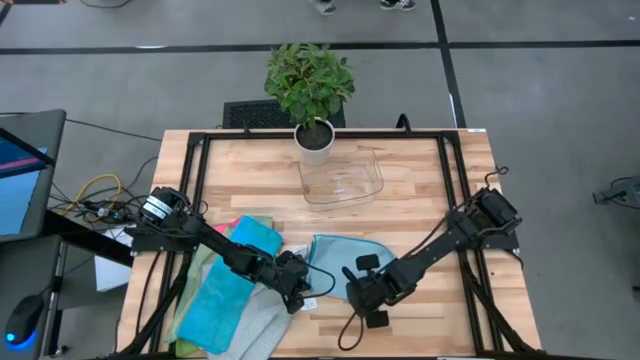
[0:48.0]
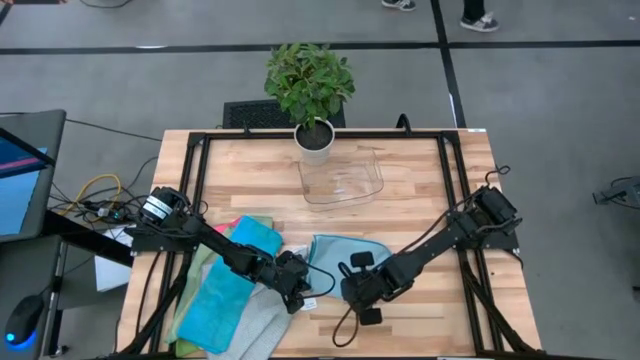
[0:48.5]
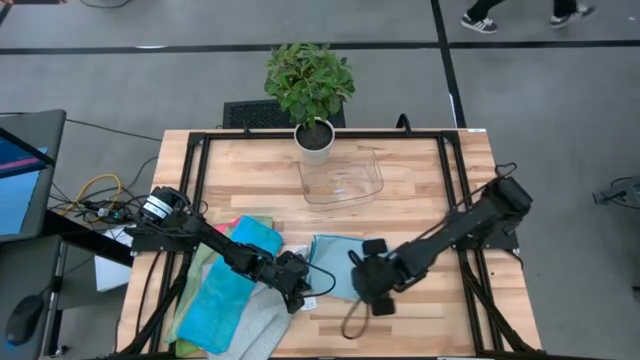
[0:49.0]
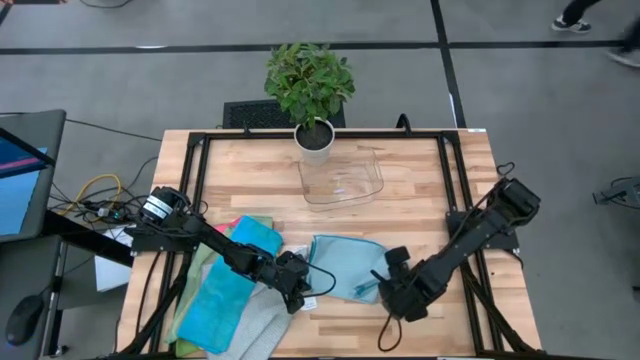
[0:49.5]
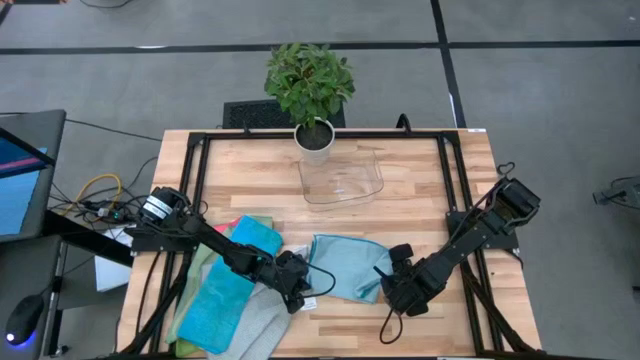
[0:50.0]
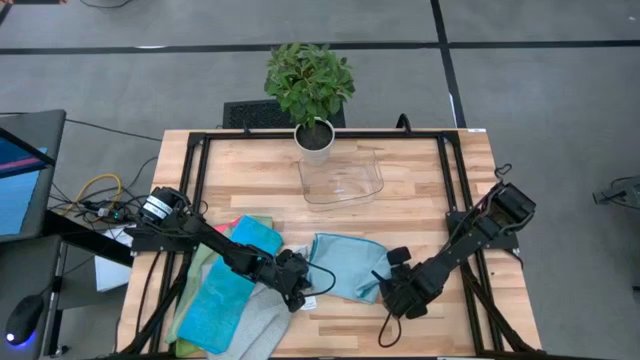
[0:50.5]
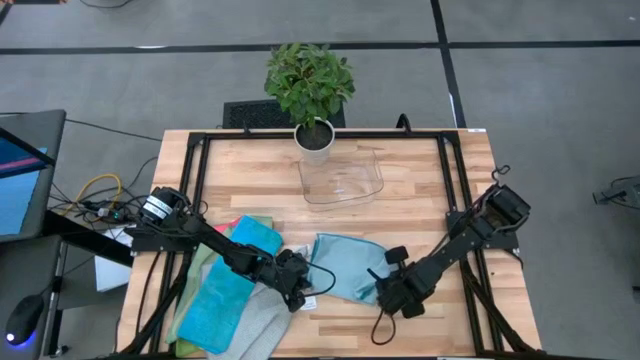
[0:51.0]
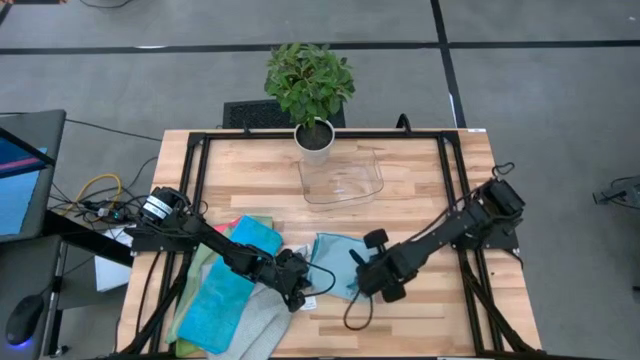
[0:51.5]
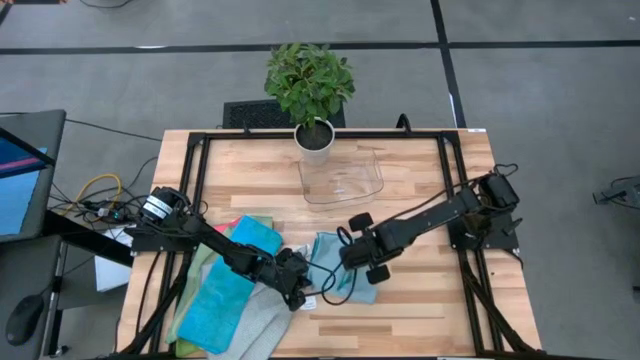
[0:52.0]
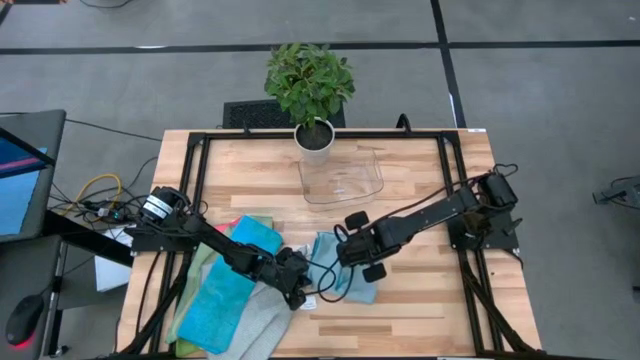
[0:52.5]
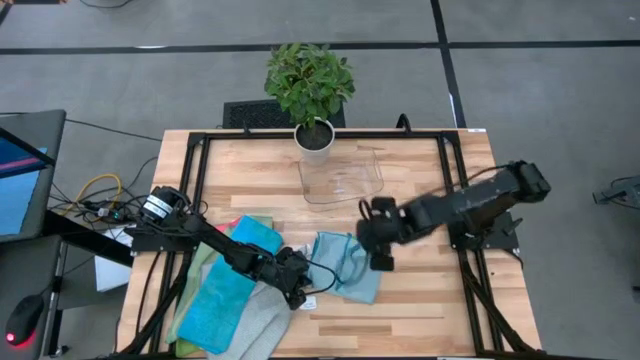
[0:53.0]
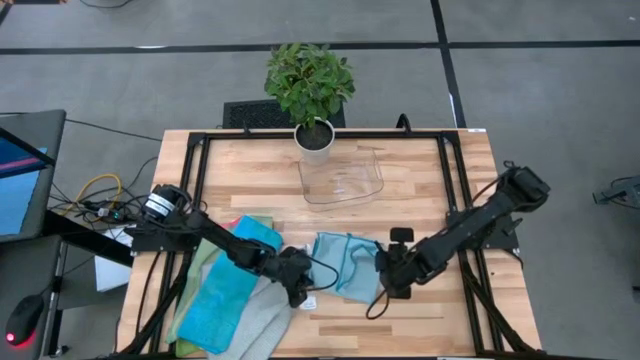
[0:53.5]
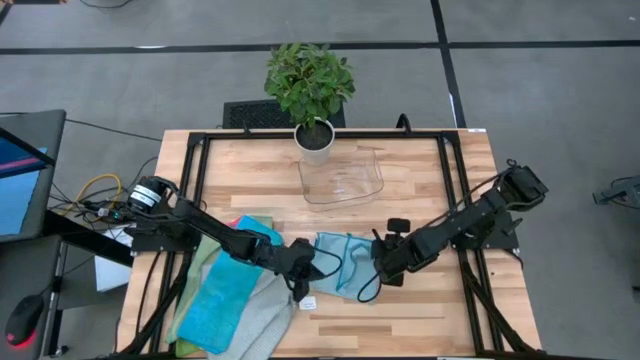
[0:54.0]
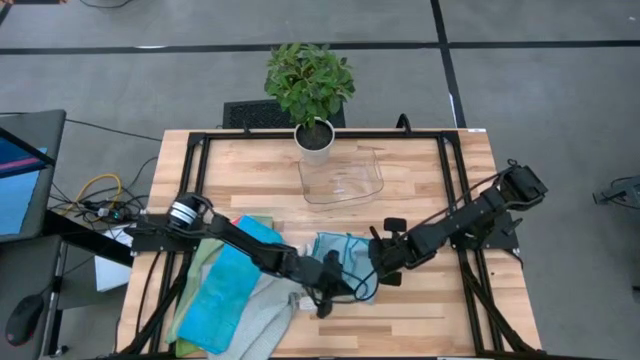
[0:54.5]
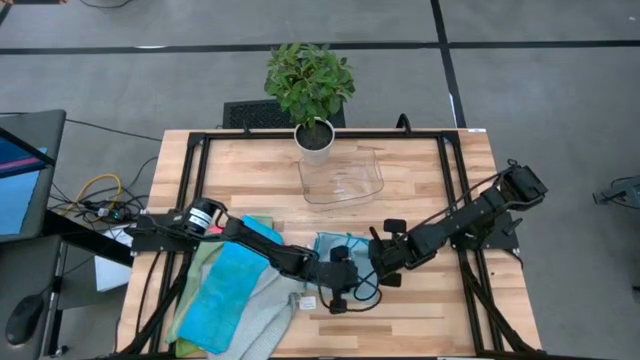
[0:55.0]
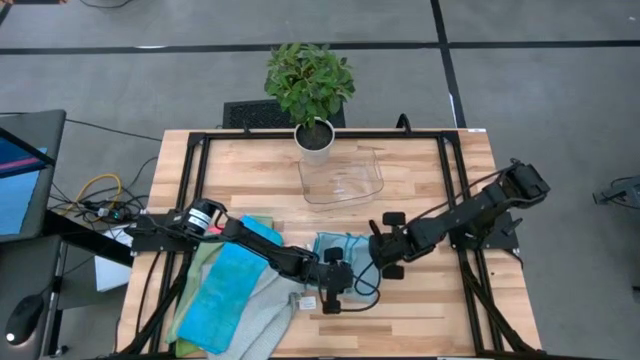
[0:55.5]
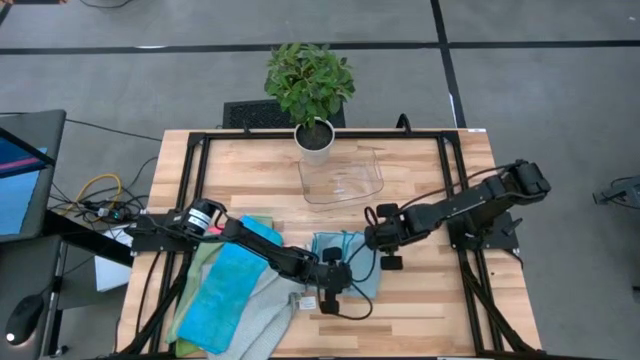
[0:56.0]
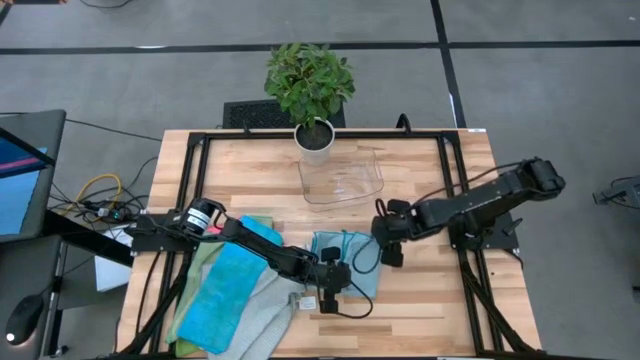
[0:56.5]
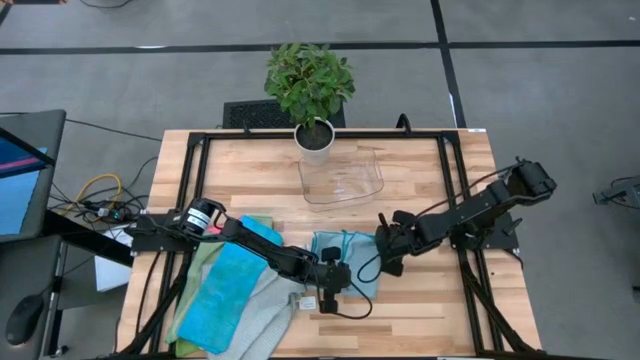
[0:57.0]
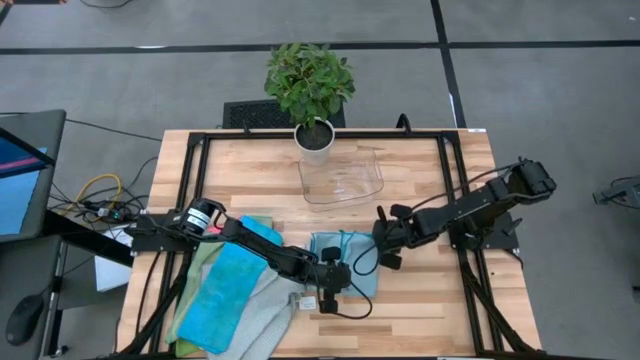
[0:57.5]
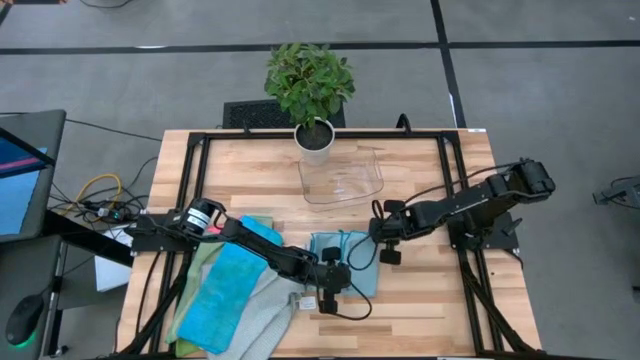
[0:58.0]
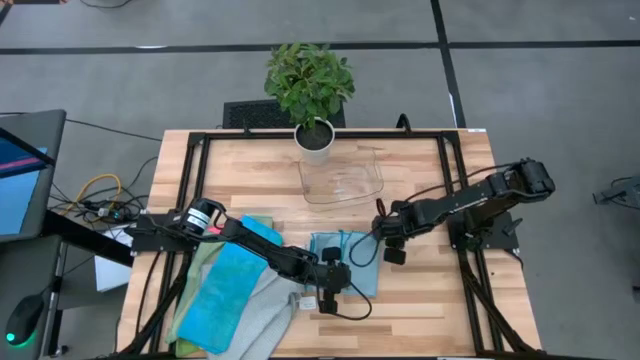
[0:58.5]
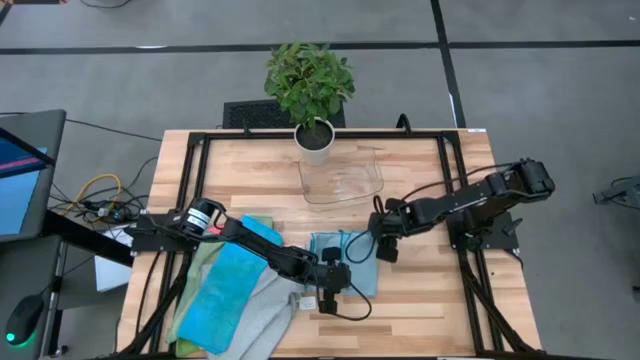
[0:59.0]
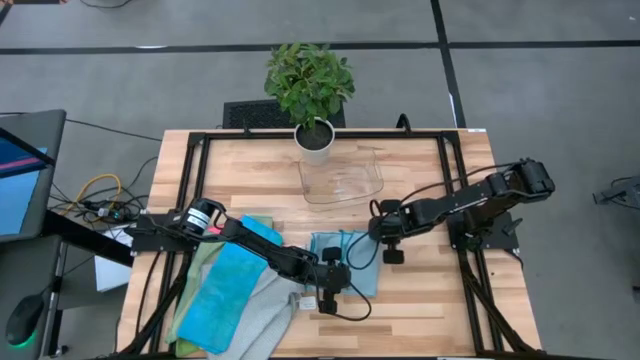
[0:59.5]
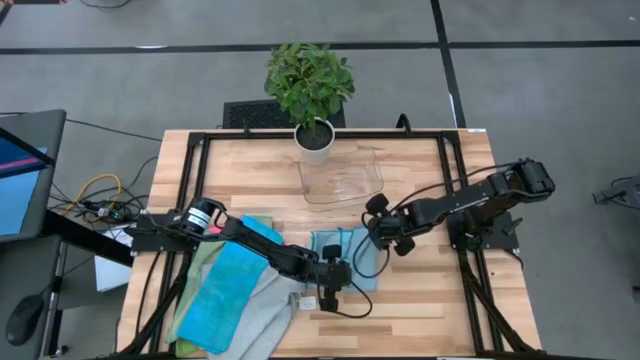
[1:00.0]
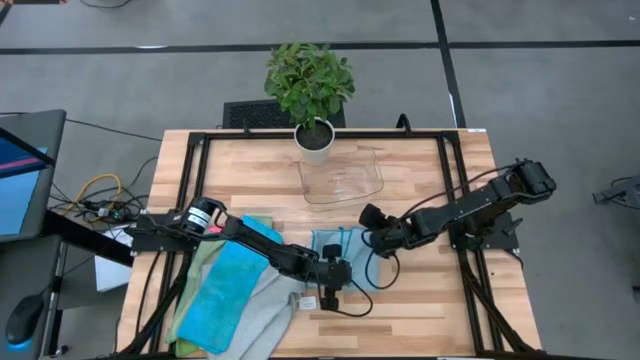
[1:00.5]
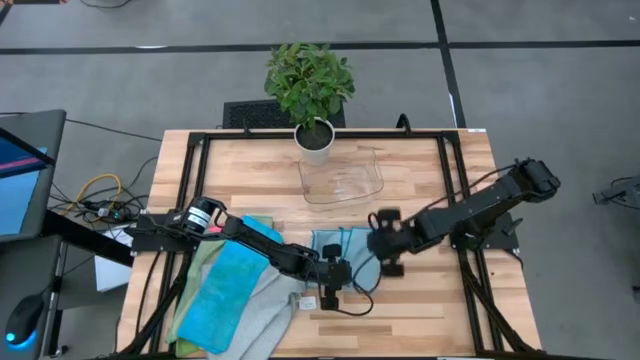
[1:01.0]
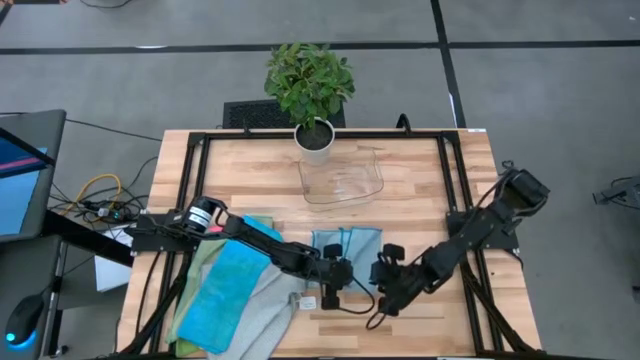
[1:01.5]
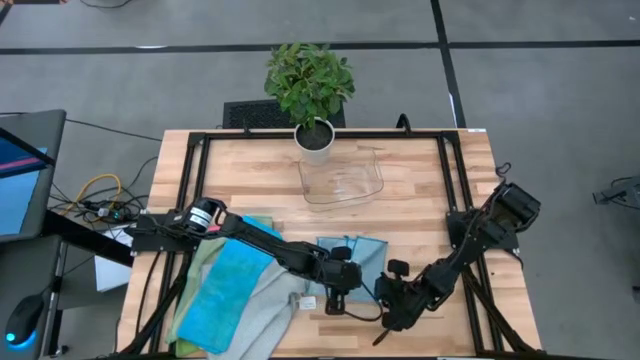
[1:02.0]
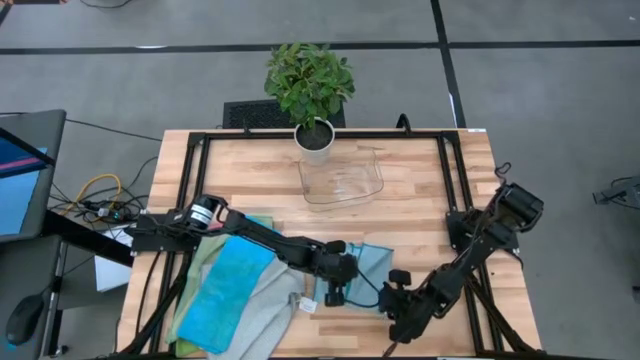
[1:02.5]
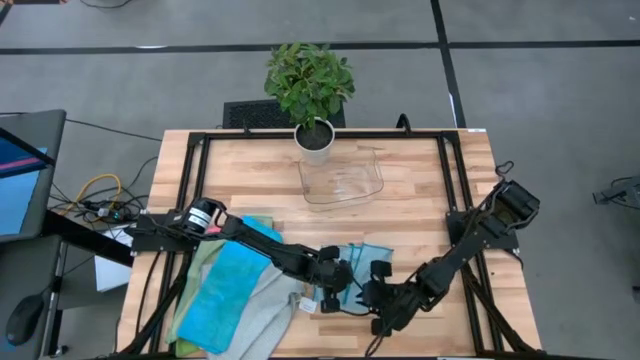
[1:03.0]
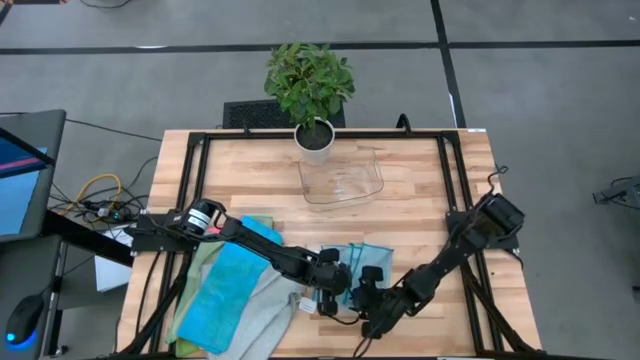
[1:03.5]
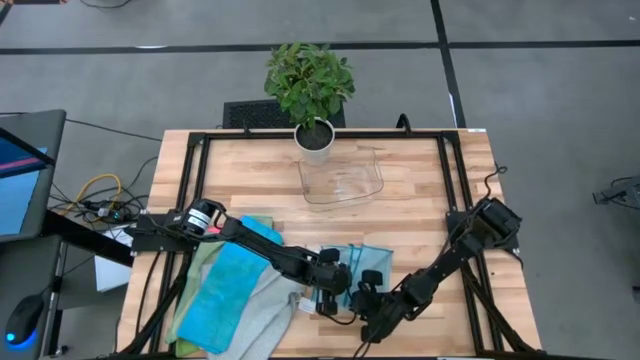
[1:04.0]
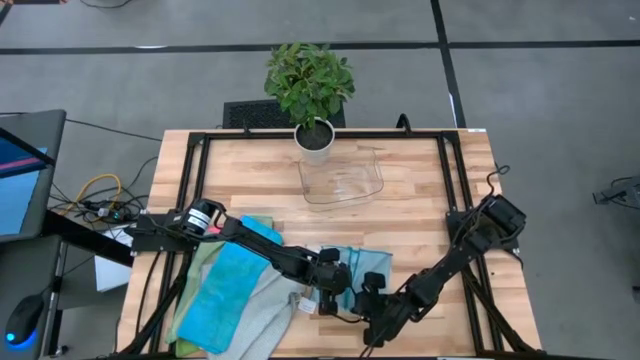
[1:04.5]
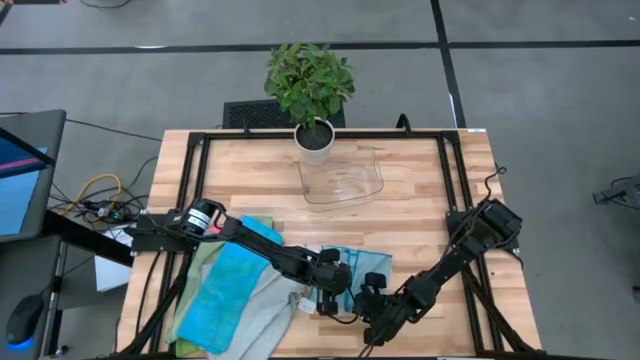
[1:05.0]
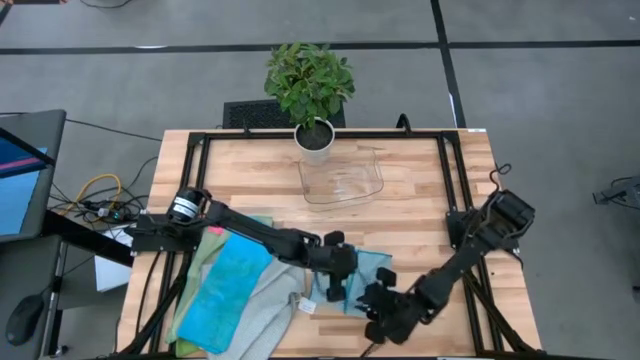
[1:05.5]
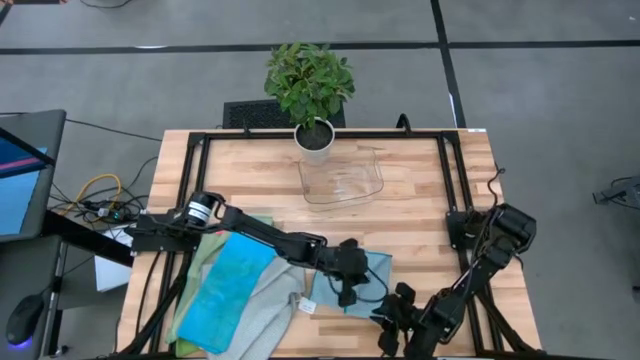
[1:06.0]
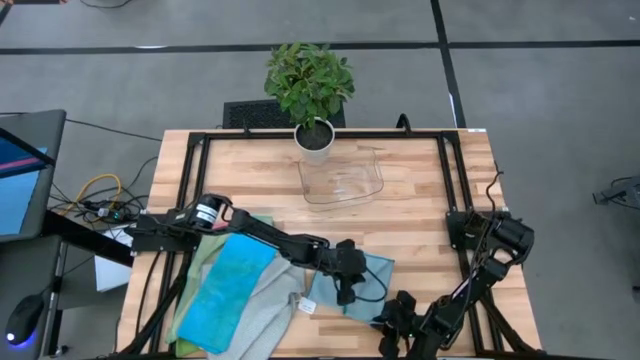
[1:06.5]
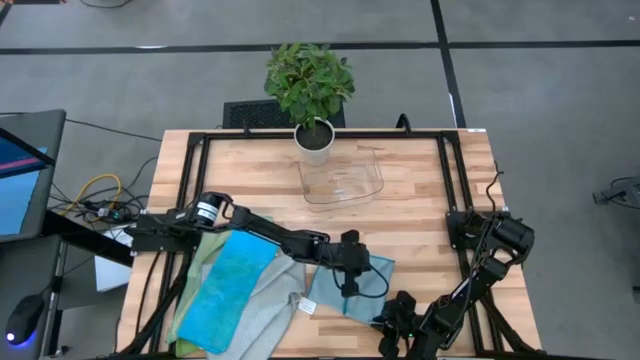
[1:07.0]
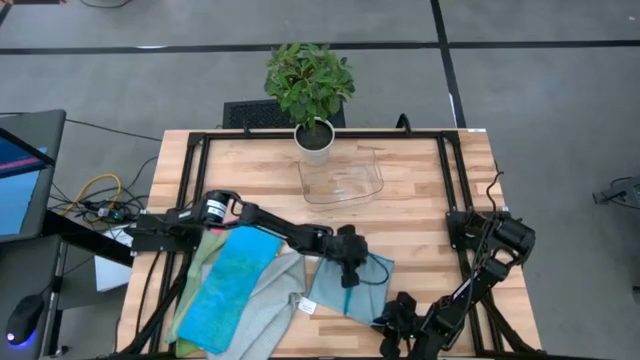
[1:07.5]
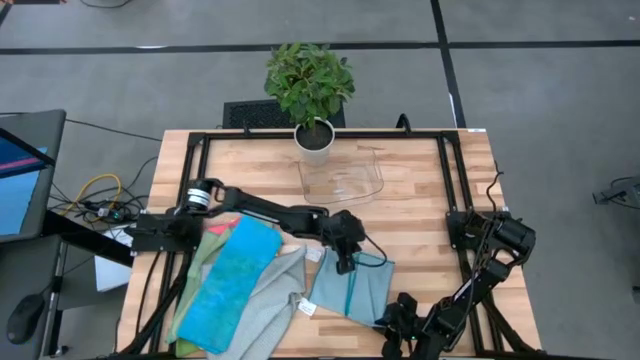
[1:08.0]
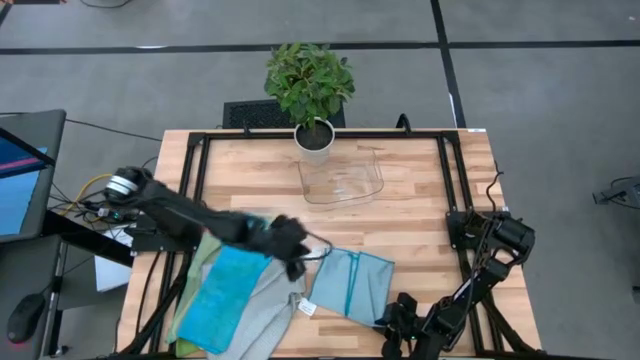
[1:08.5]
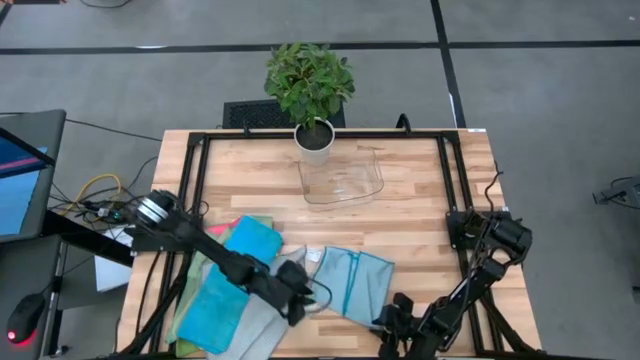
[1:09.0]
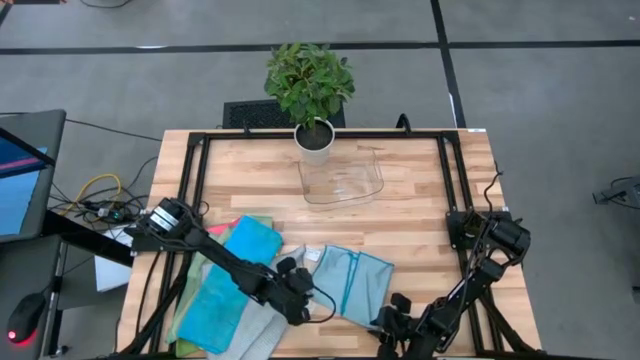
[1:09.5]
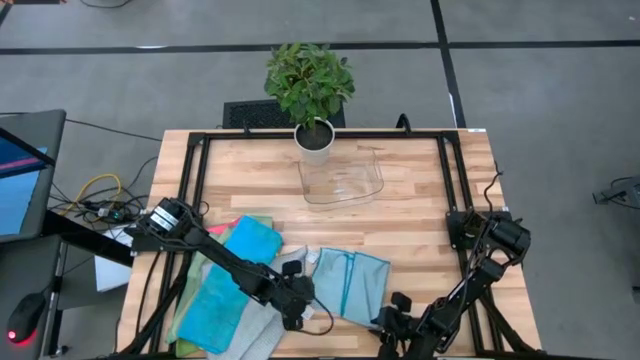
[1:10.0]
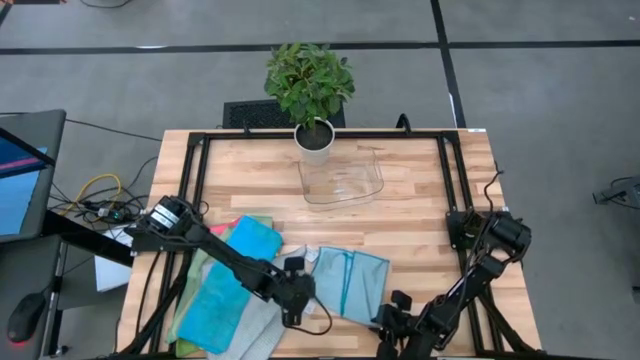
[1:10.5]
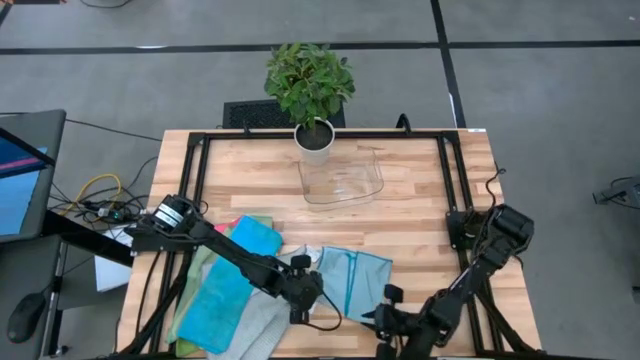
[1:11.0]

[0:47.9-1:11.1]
Task: Fold microfiber towels
Fold the light blue microfiber cloth
